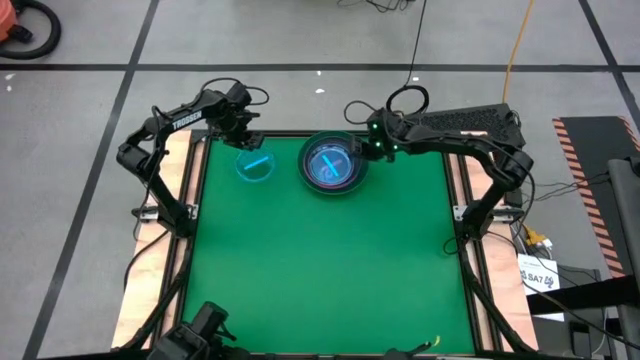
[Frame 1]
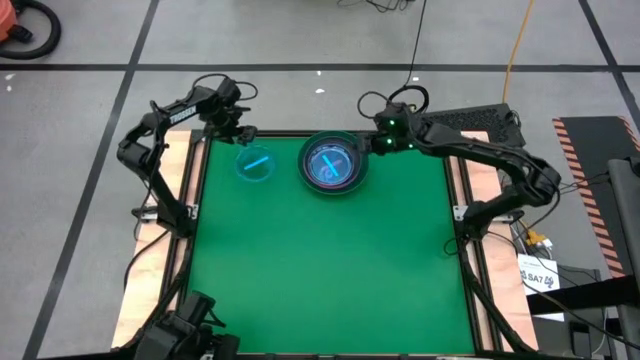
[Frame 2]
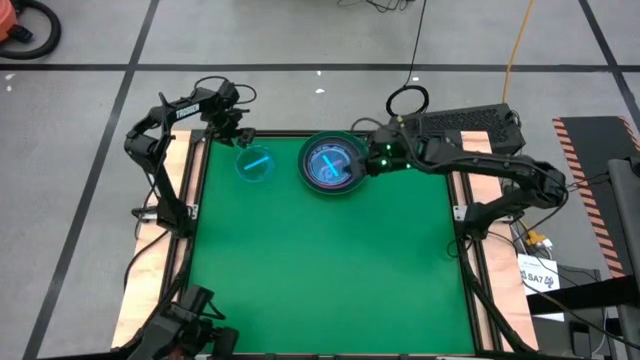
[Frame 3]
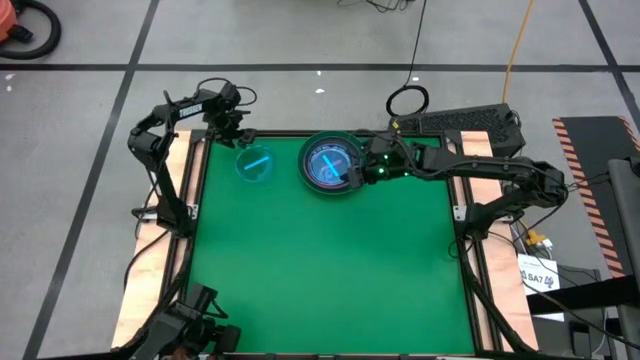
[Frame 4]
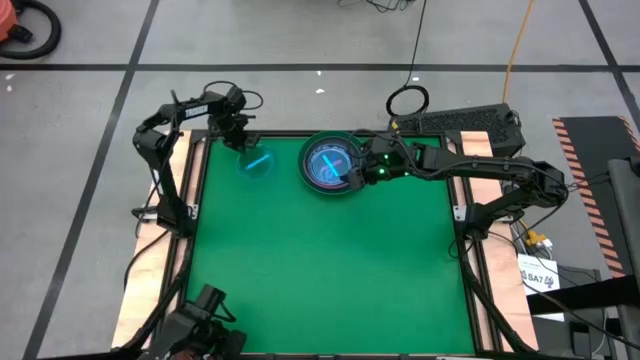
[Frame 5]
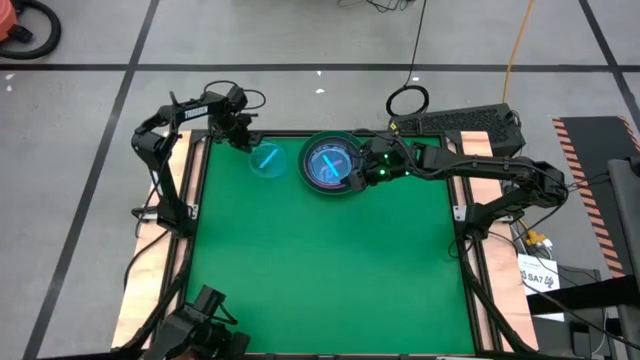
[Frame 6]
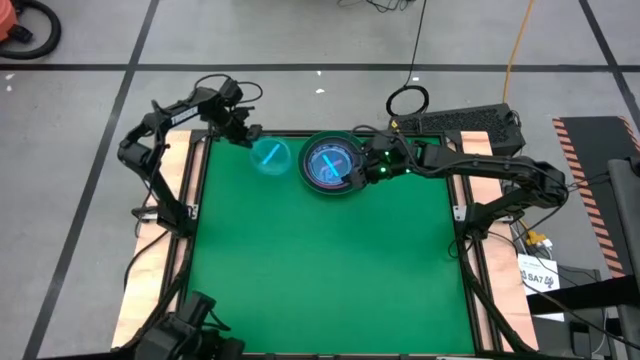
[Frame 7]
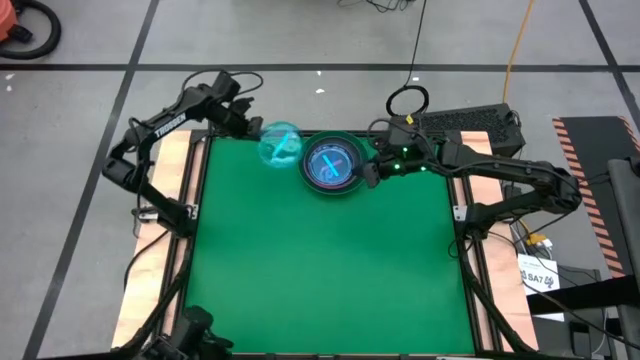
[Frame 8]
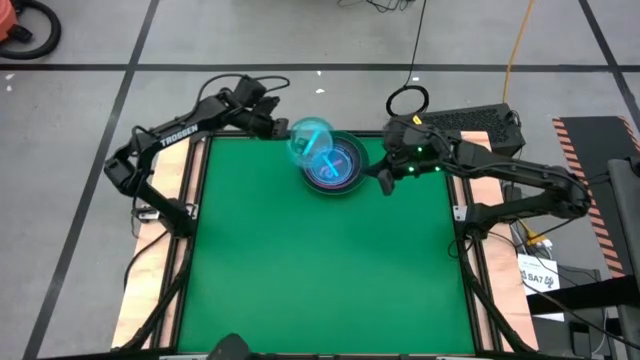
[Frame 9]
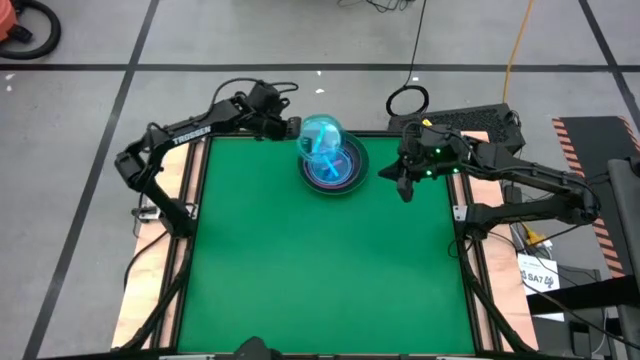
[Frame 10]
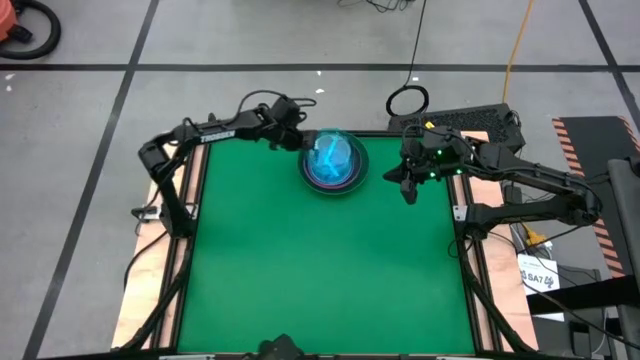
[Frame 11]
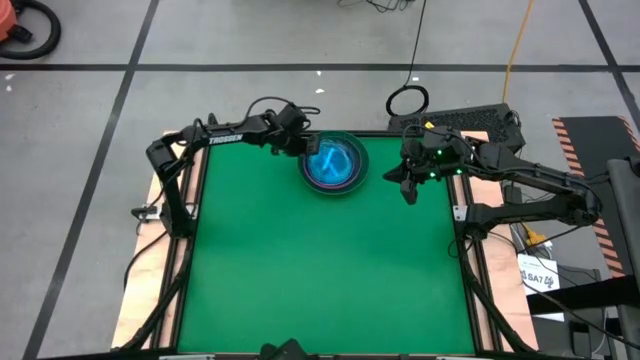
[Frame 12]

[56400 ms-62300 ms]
Task: Stack plastic plates
Stack the blue plate on top of the other blue plate

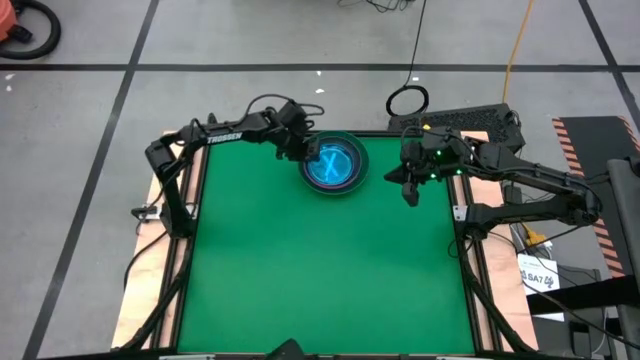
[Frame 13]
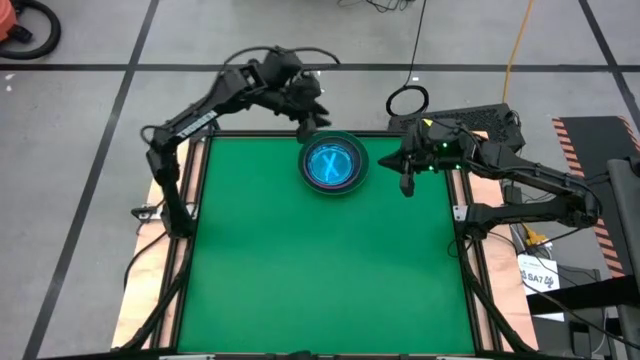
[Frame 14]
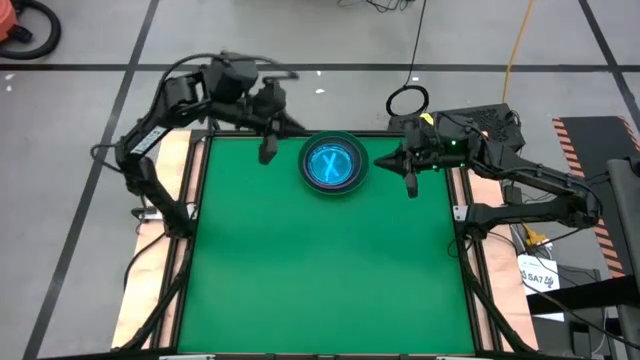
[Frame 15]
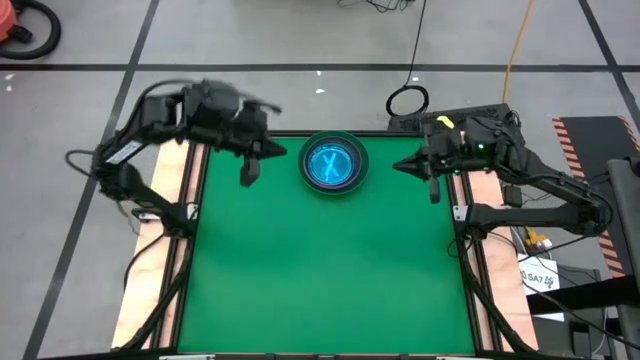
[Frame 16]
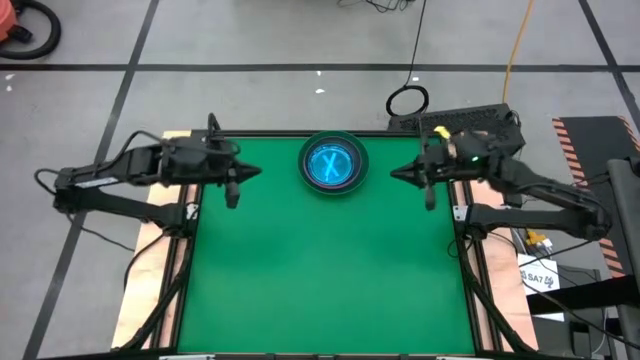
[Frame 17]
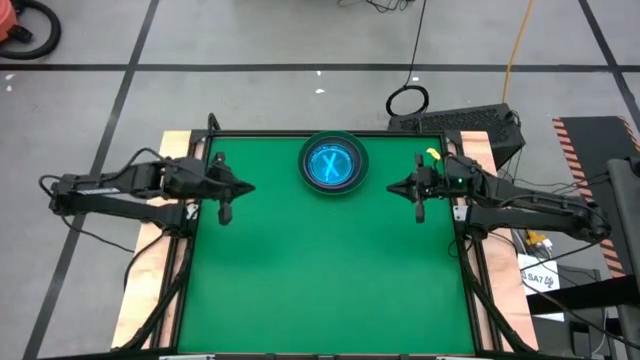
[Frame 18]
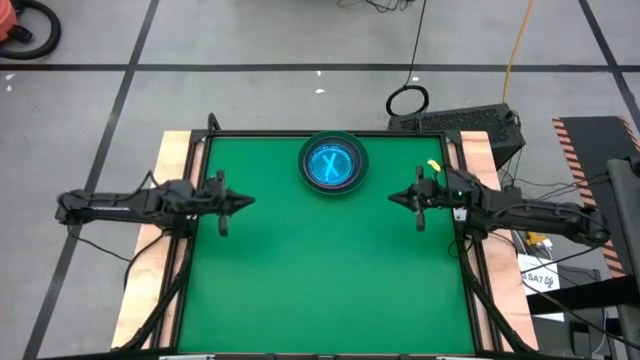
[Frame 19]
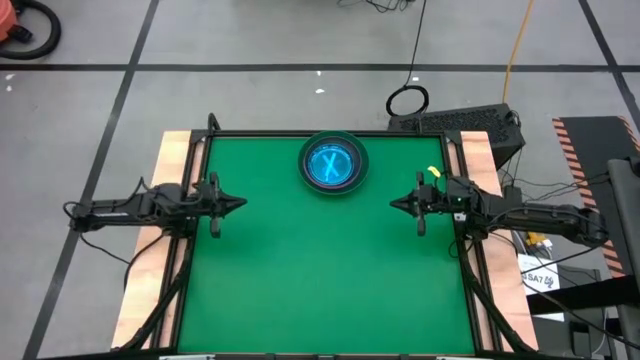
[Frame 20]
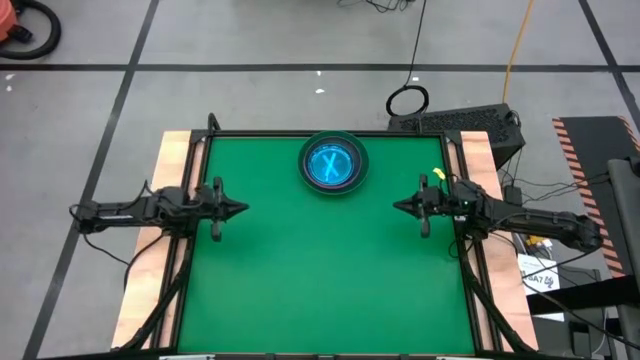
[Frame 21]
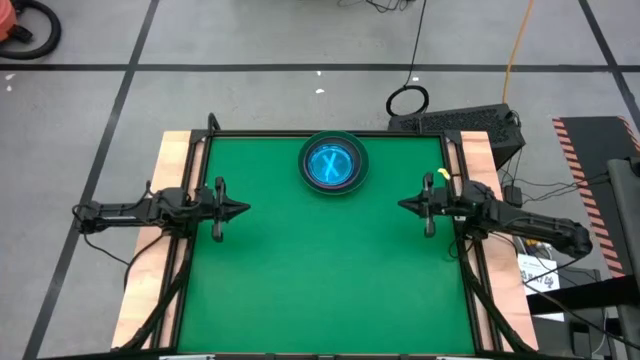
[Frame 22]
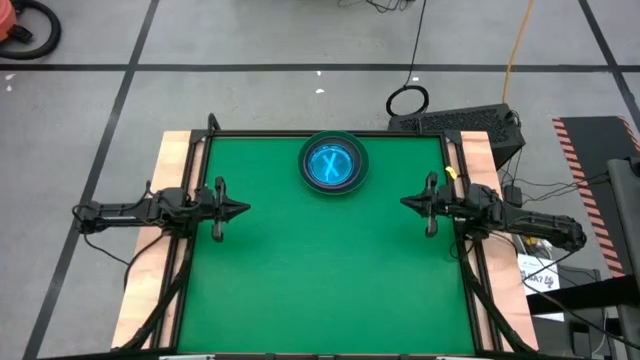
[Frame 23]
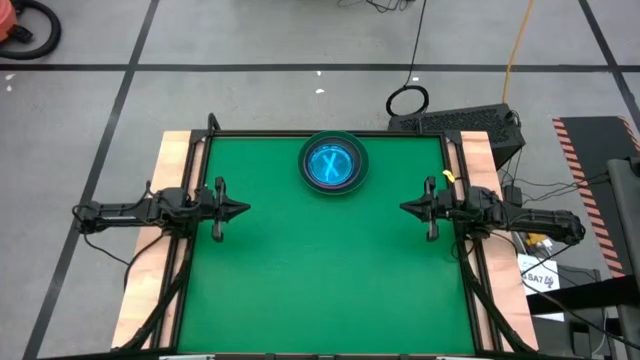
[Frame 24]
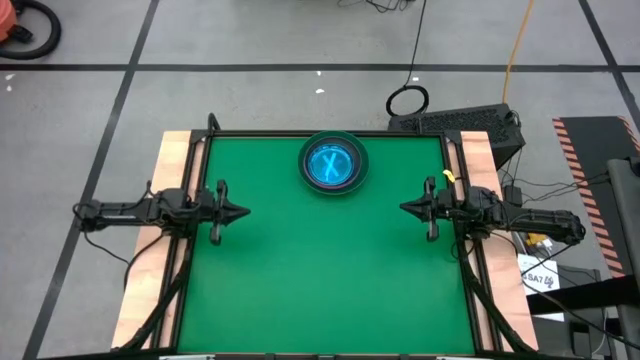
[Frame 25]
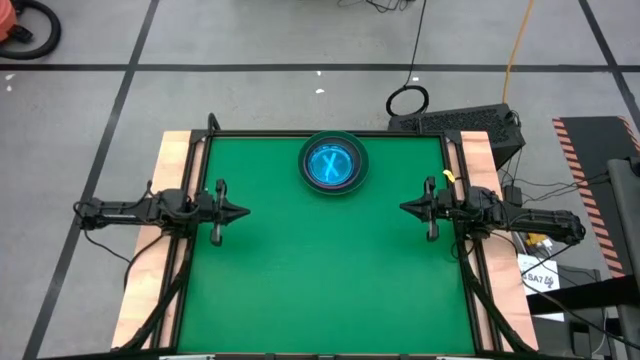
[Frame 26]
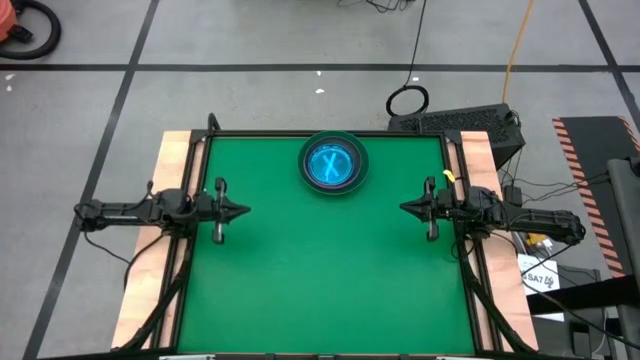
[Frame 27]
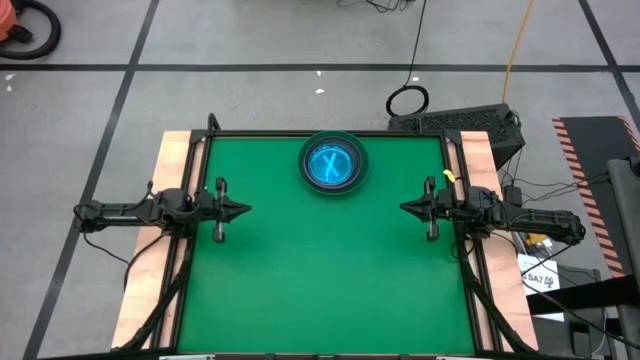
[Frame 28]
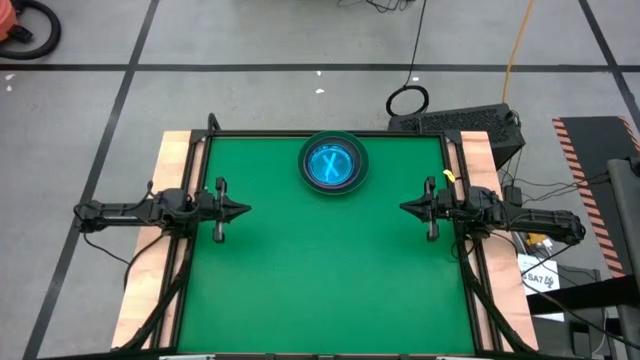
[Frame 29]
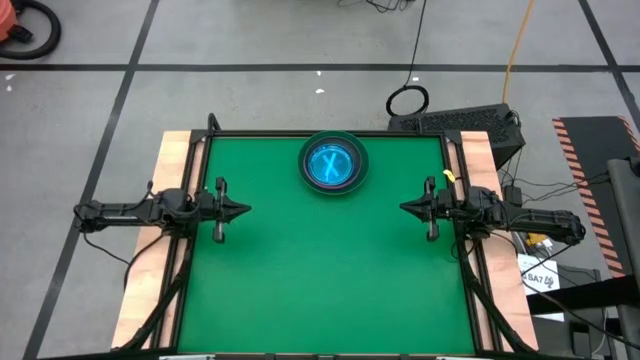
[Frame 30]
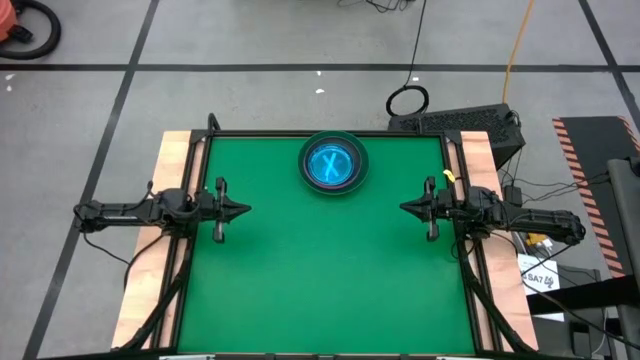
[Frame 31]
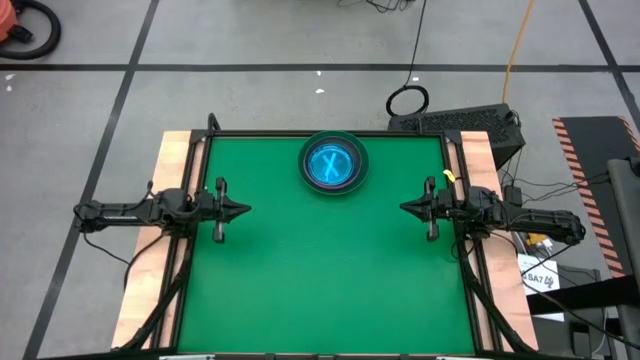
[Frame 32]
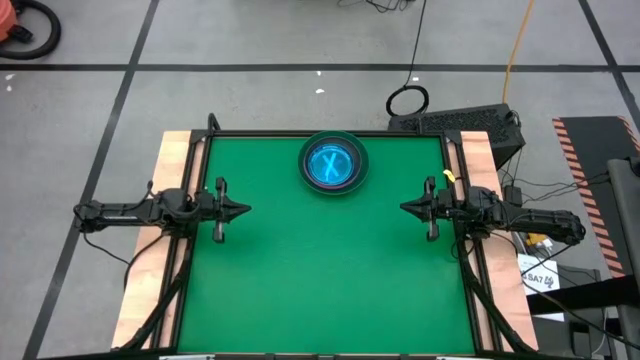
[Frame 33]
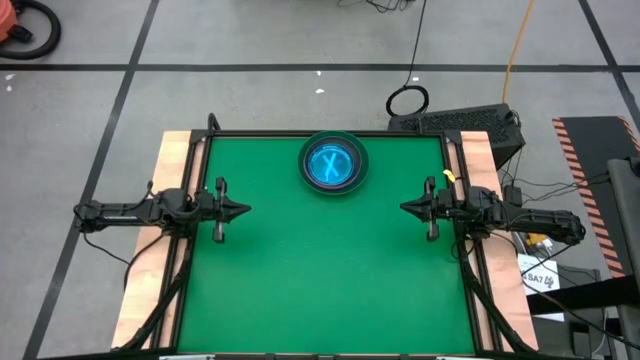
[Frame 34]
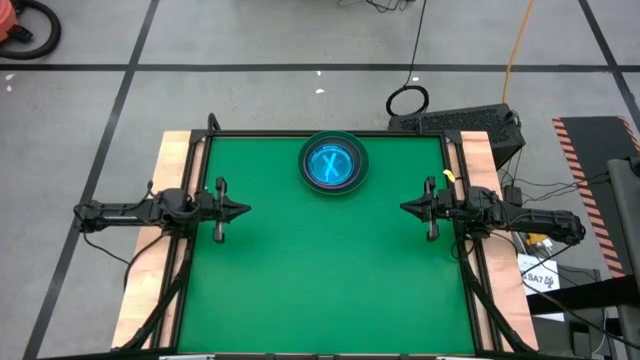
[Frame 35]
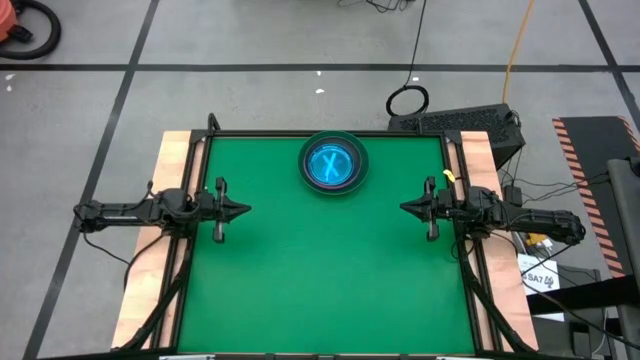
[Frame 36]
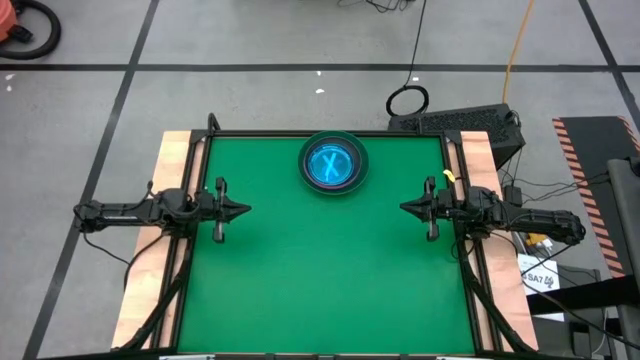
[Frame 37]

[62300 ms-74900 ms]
Return to Home Position

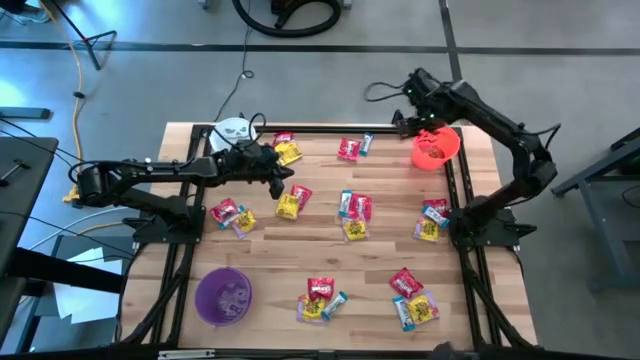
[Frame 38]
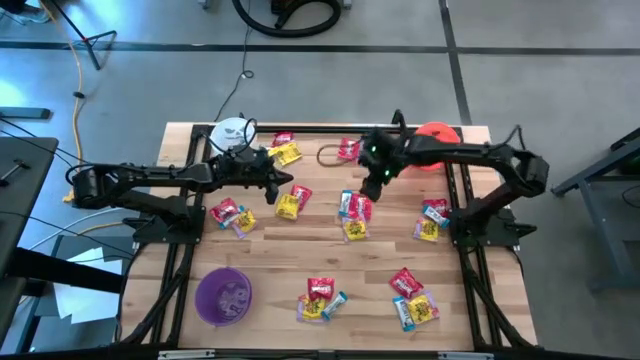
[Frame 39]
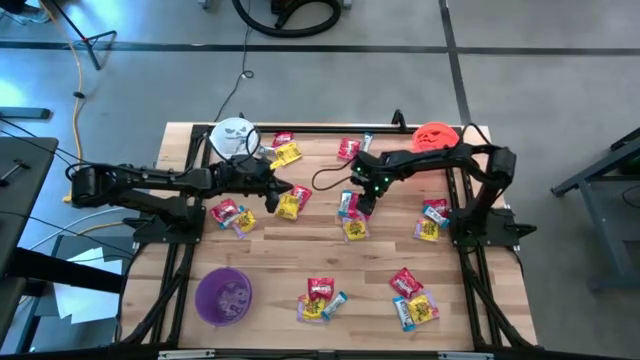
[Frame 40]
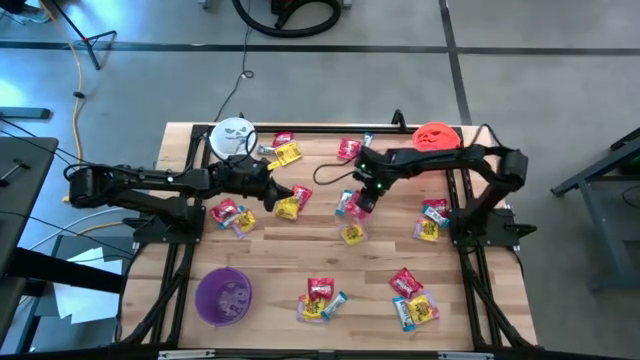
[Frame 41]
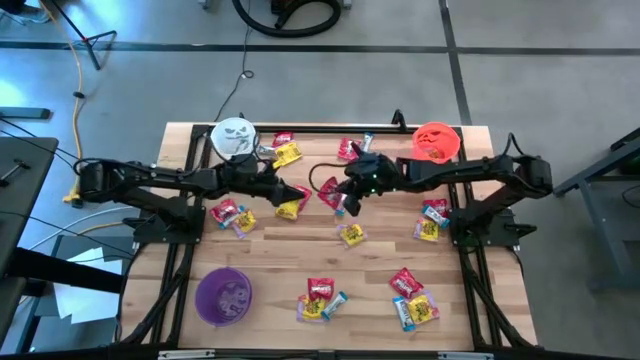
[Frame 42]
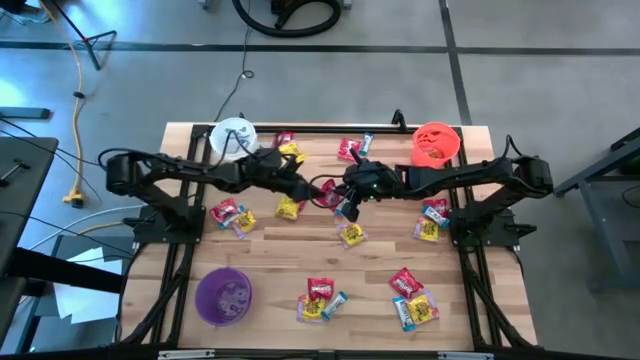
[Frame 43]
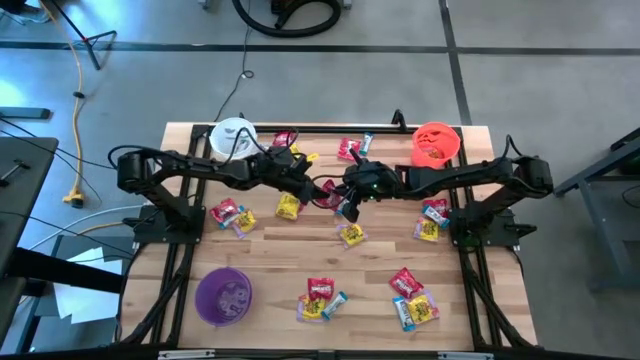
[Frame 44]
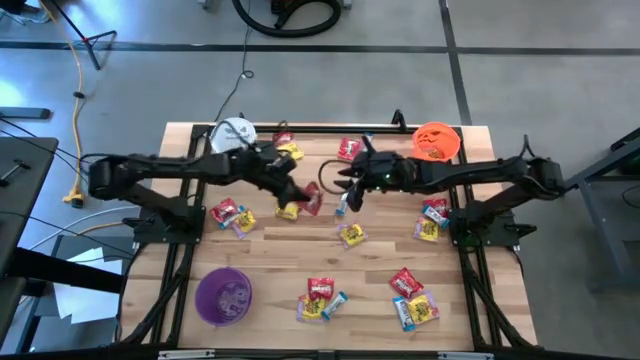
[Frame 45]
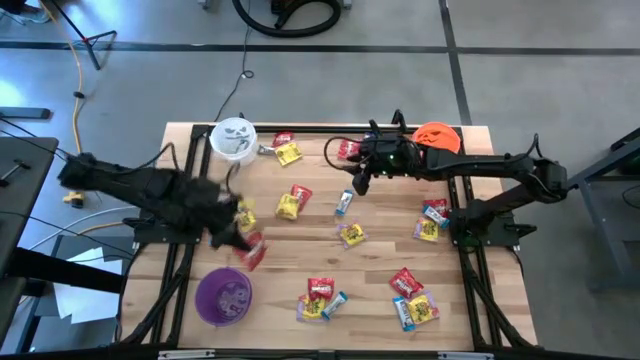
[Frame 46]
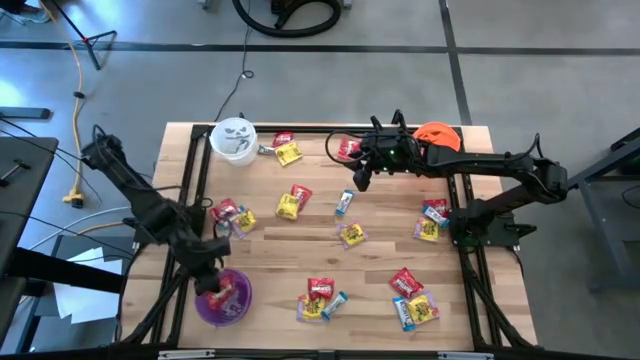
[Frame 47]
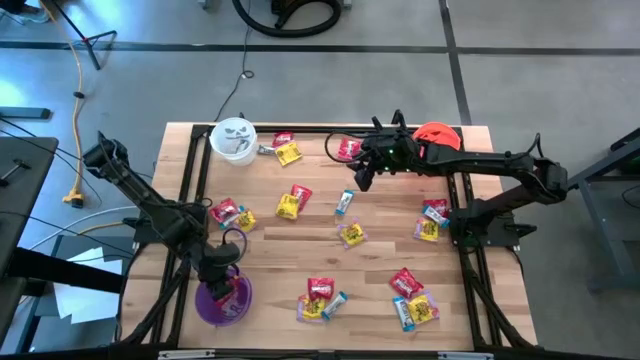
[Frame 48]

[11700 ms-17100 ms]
Task: Sort candy
Put the red candy into the purple bucket
